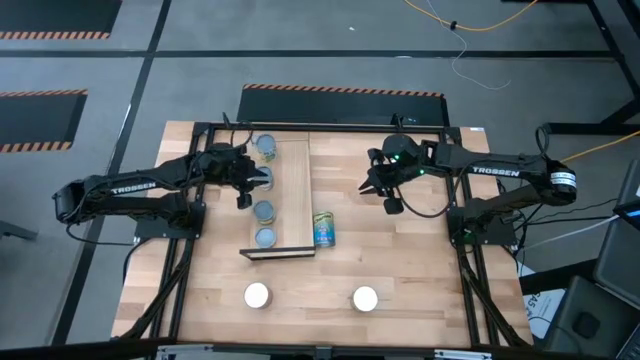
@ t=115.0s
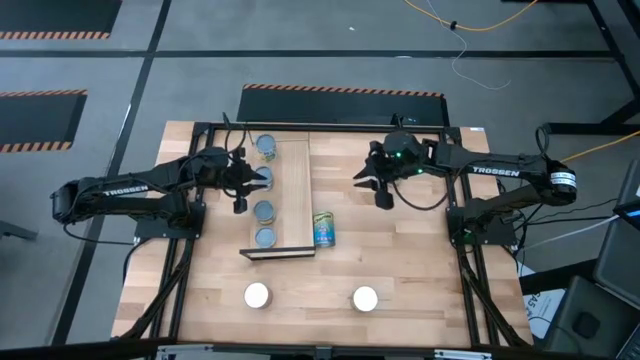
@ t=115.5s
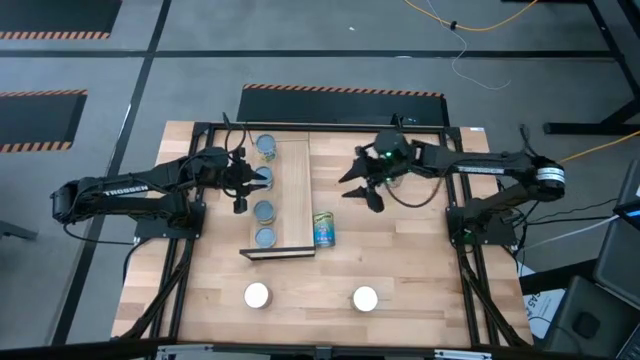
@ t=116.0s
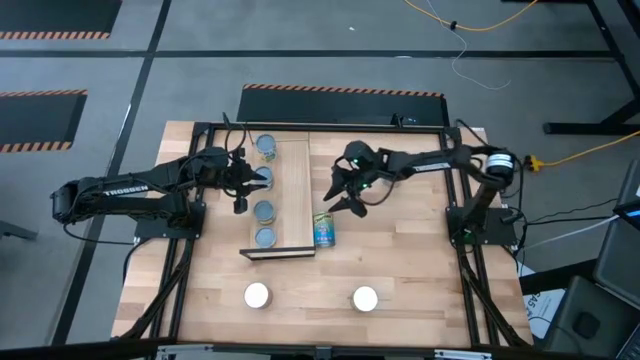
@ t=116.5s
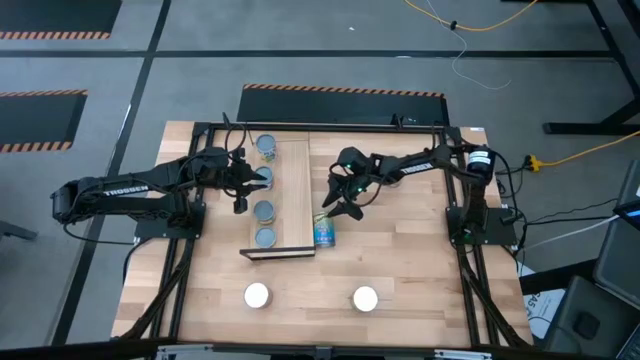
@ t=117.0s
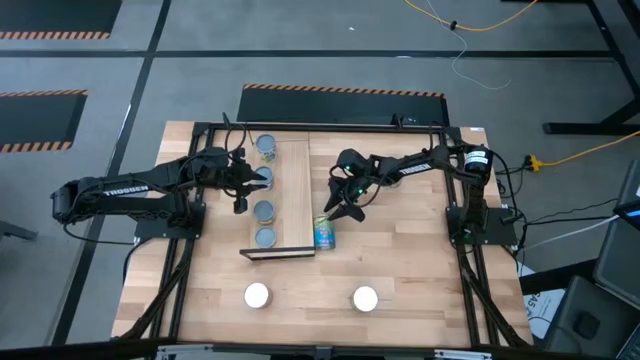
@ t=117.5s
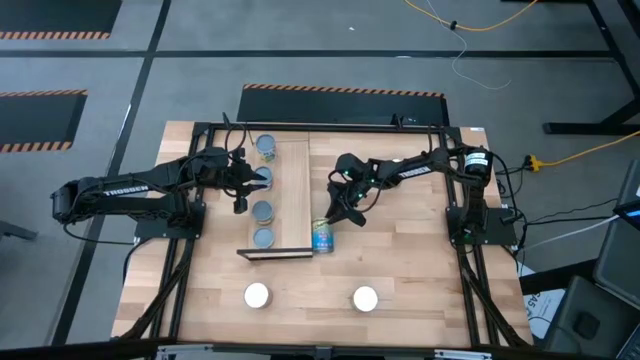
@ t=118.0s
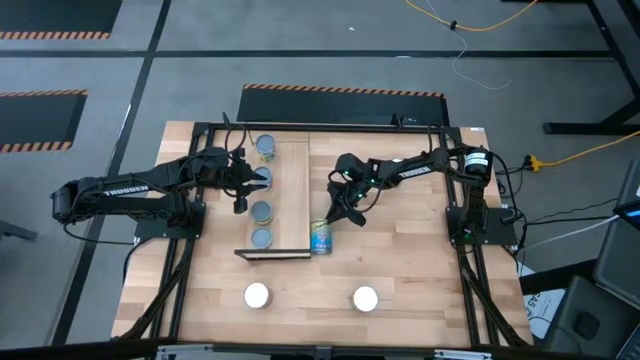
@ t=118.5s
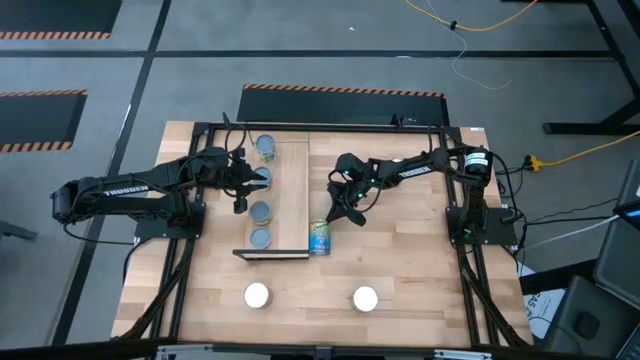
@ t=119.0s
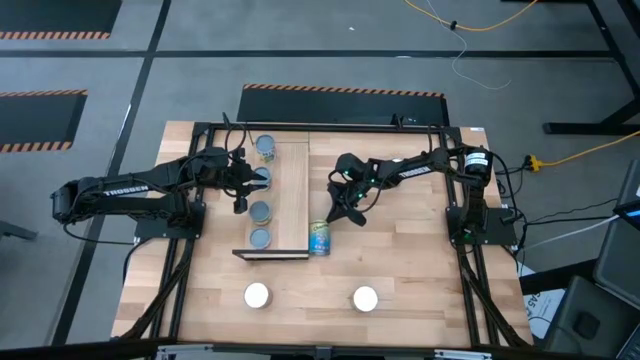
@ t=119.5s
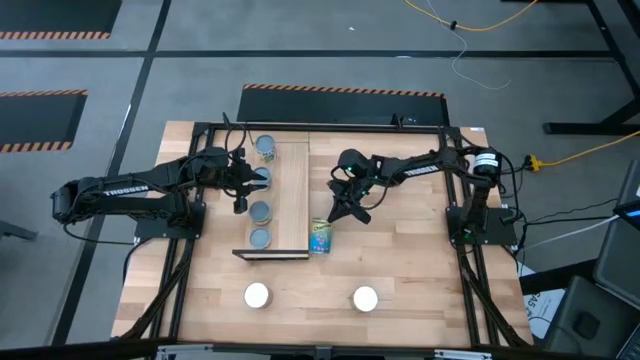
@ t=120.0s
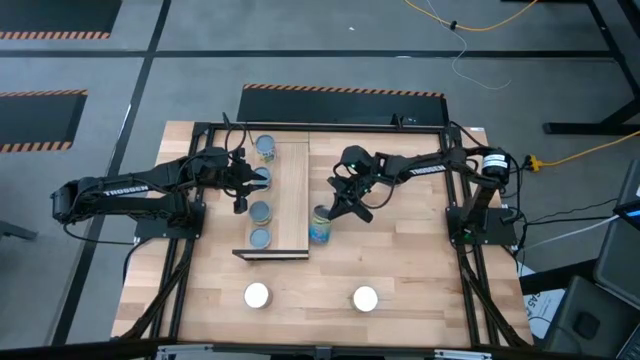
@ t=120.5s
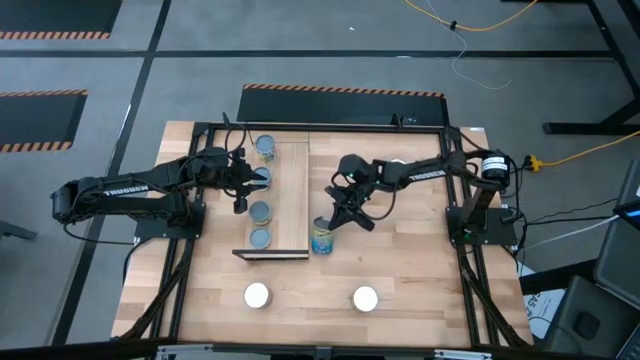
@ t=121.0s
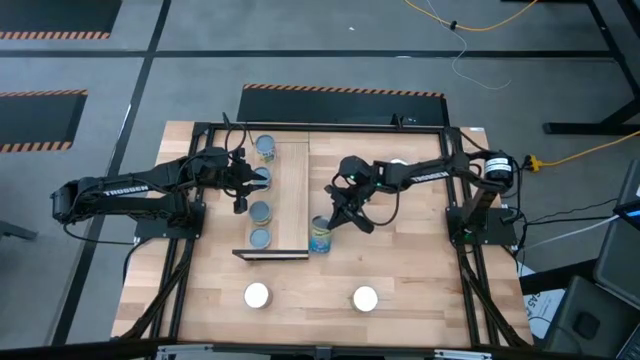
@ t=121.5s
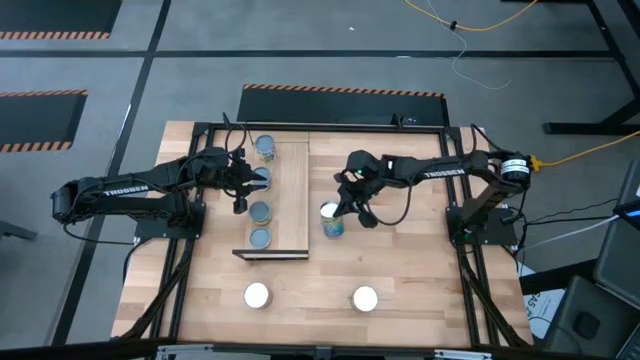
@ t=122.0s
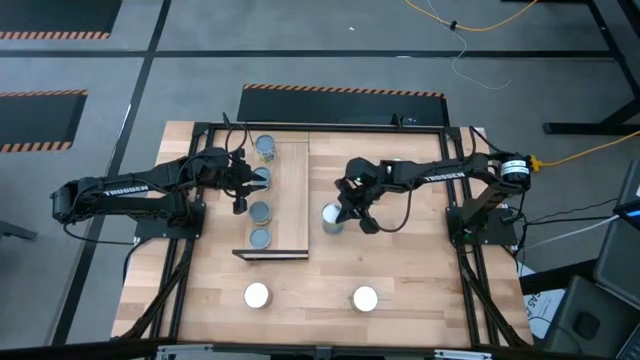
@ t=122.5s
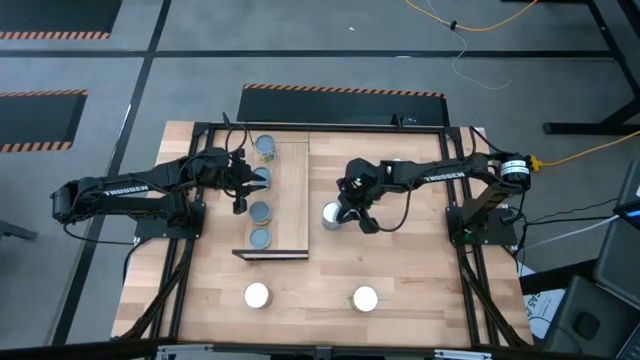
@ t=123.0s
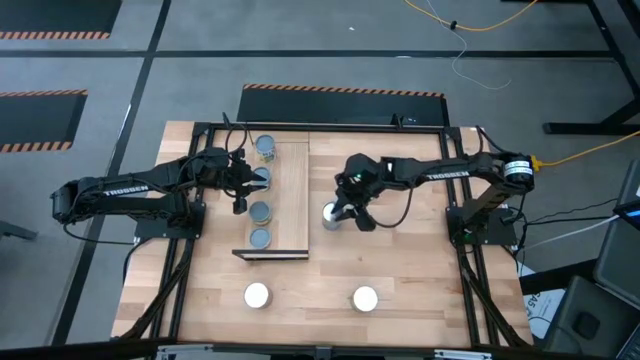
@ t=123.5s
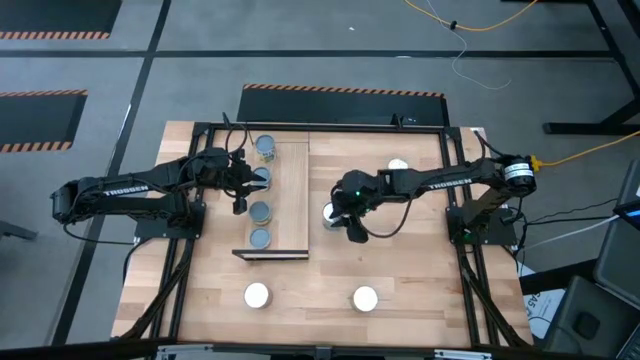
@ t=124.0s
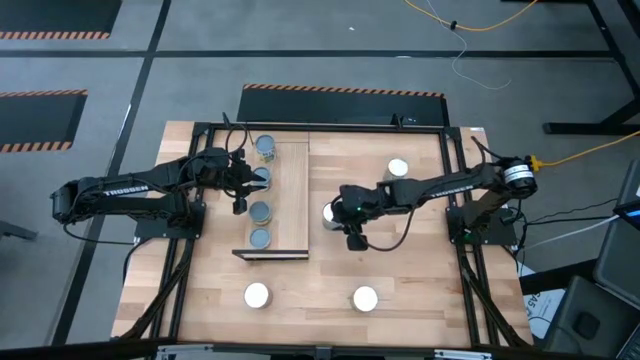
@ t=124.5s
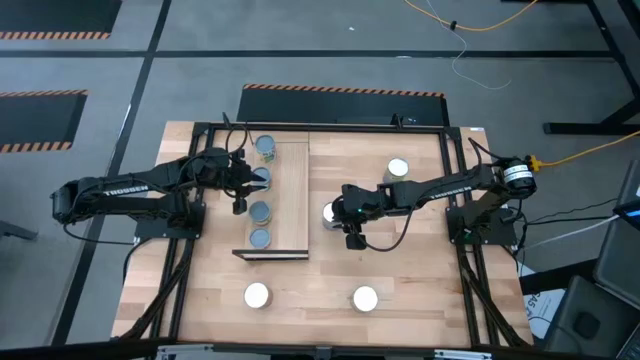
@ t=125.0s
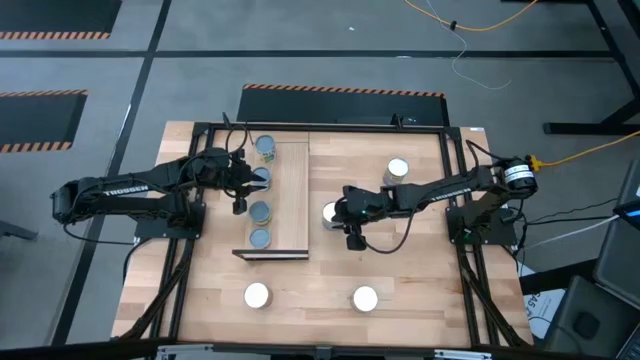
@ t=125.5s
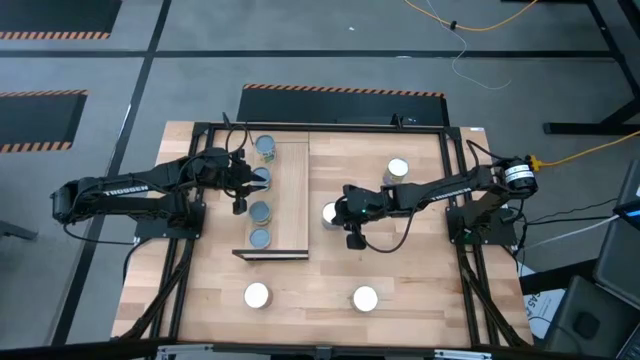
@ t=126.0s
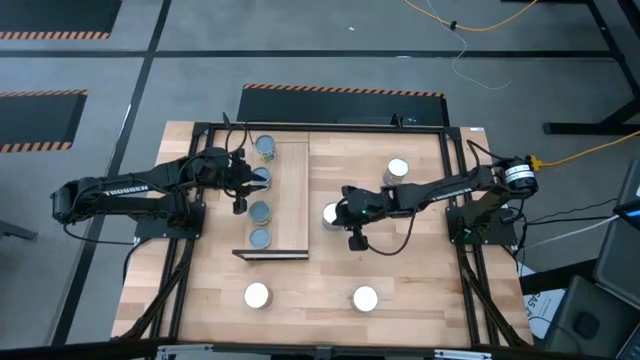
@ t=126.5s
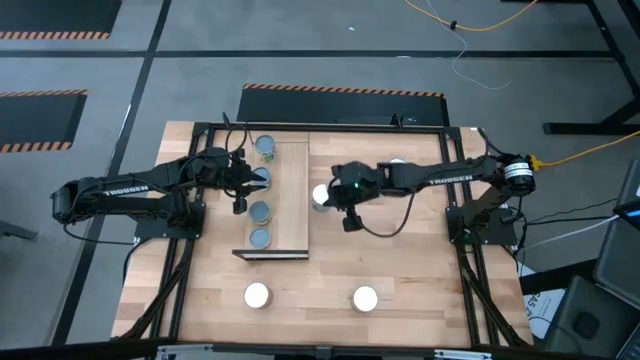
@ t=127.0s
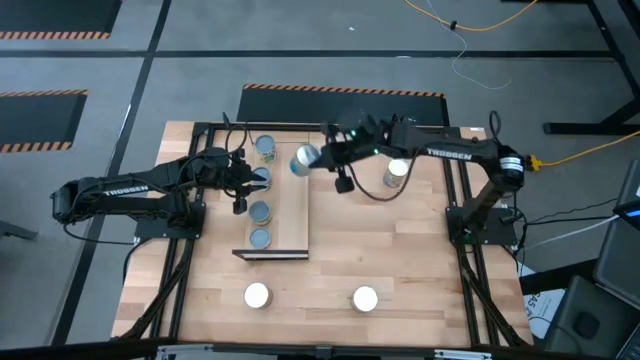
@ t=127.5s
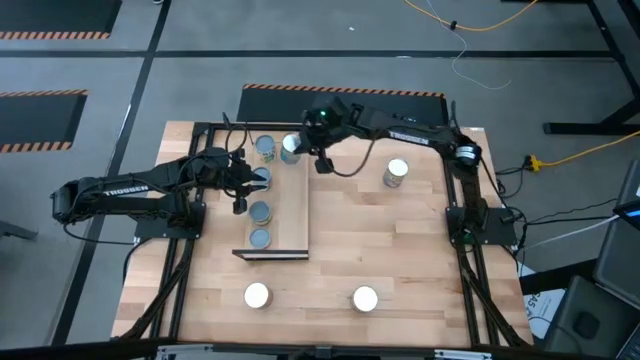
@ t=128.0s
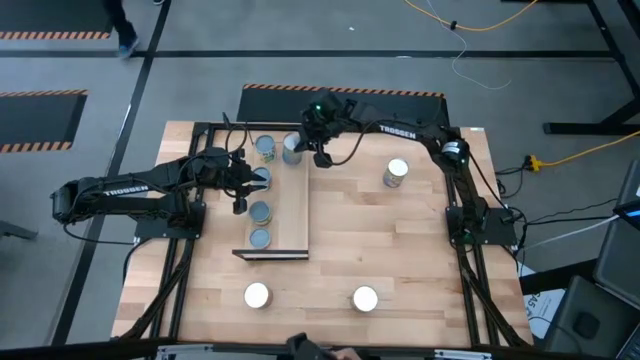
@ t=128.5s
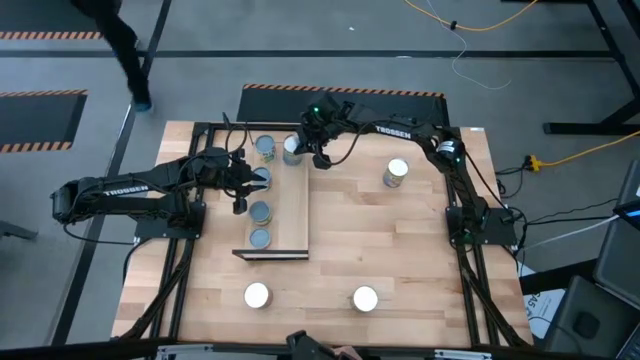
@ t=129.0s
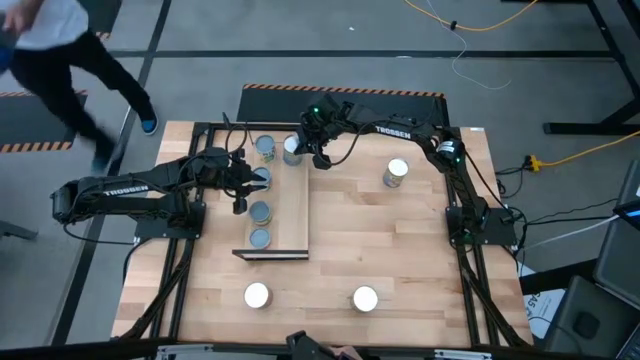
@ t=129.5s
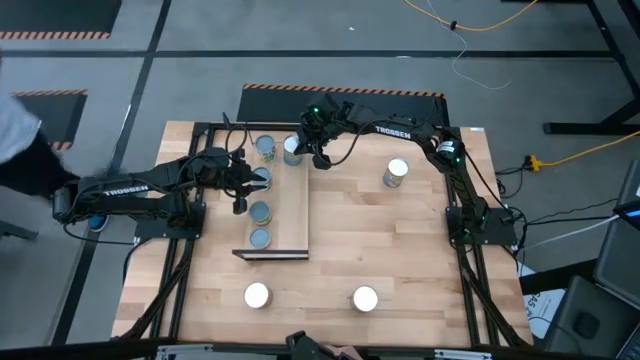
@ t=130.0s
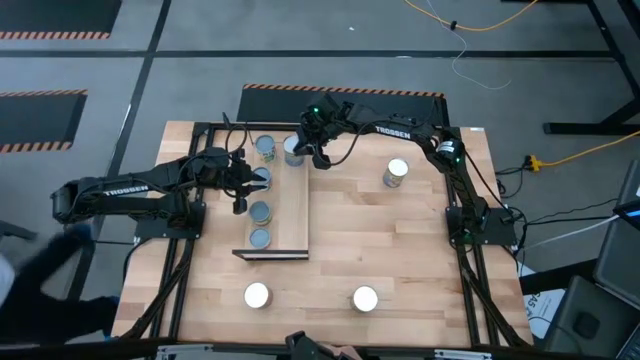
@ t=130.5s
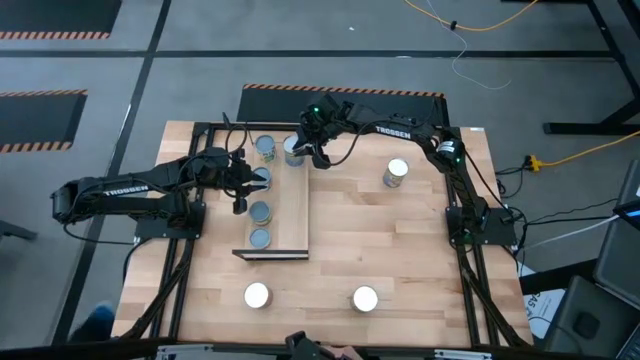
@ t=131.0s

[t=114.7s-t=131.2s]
Task: Pick and place cans onto a shelf
Put the canned cherries on the shelf

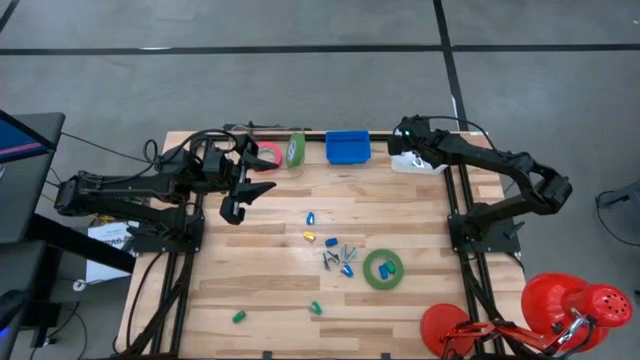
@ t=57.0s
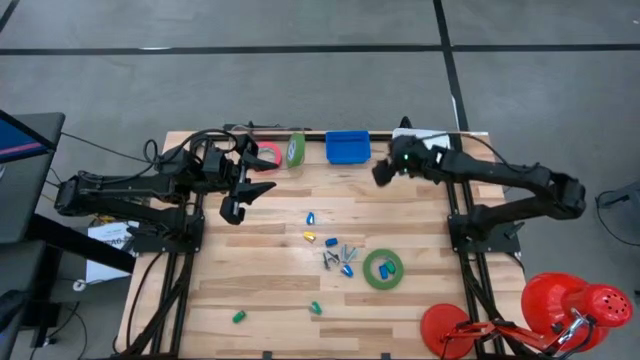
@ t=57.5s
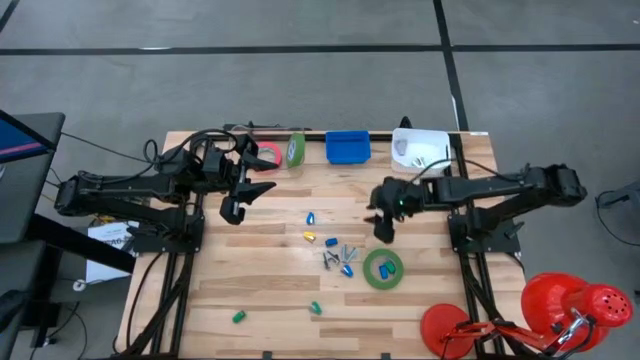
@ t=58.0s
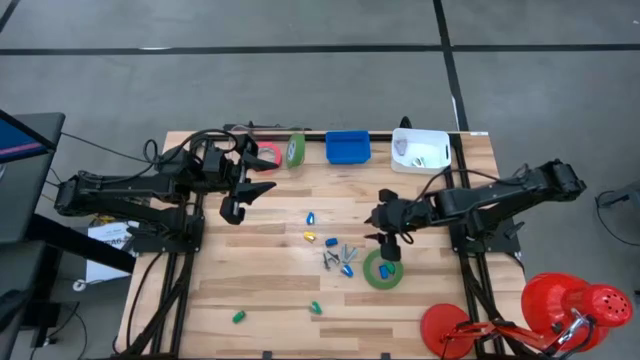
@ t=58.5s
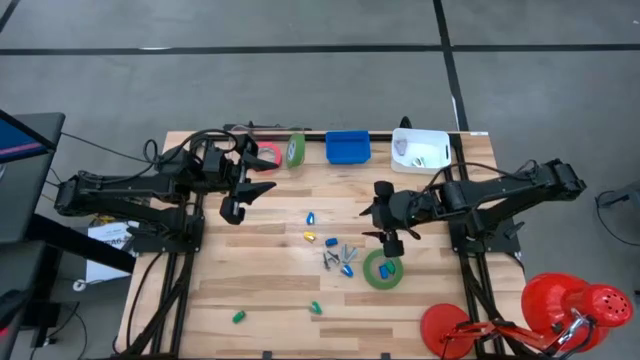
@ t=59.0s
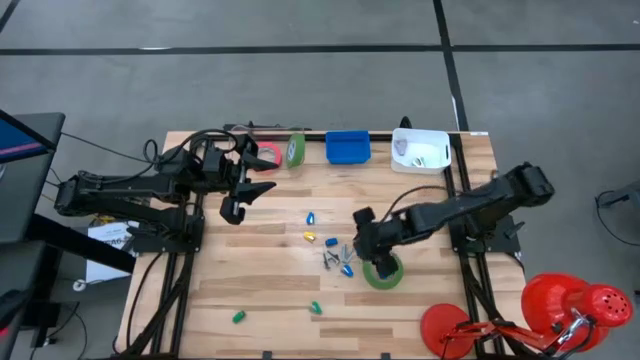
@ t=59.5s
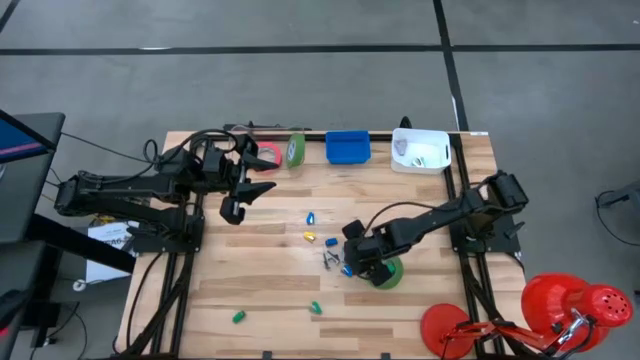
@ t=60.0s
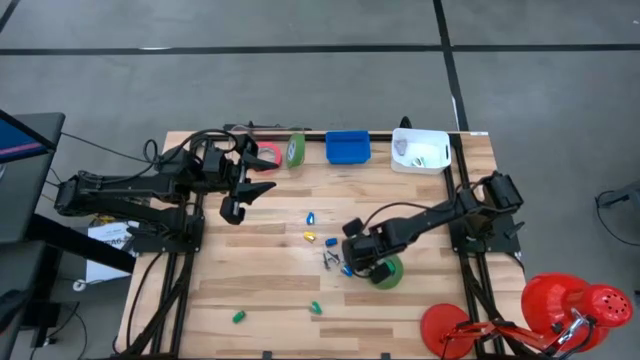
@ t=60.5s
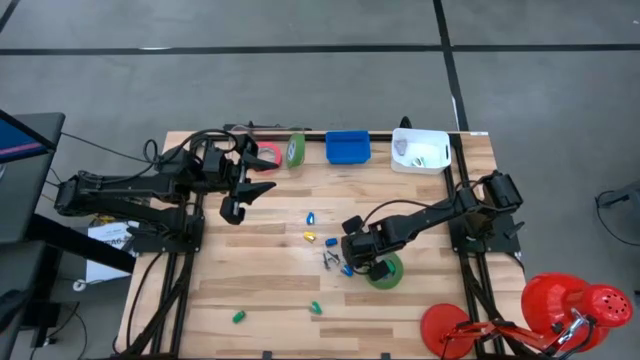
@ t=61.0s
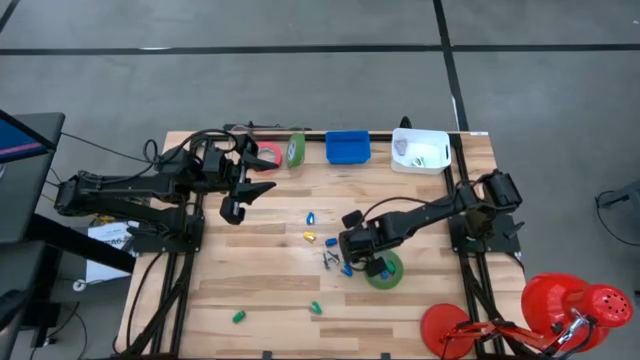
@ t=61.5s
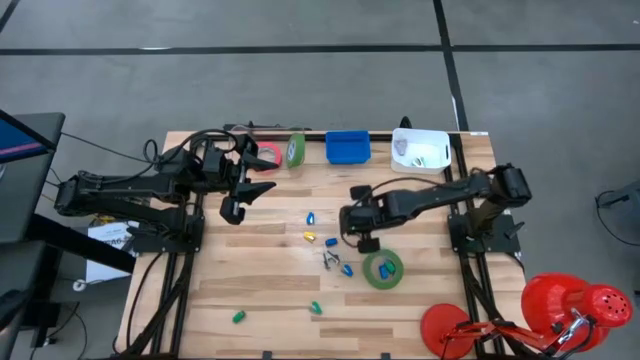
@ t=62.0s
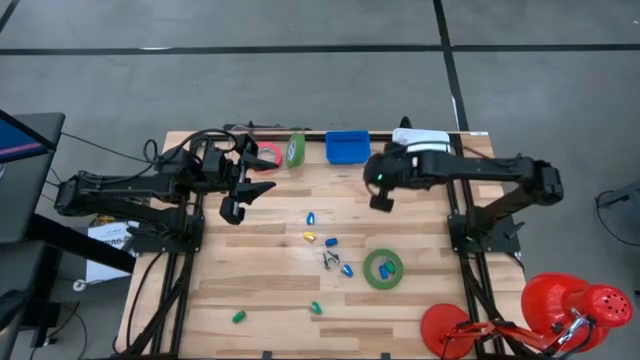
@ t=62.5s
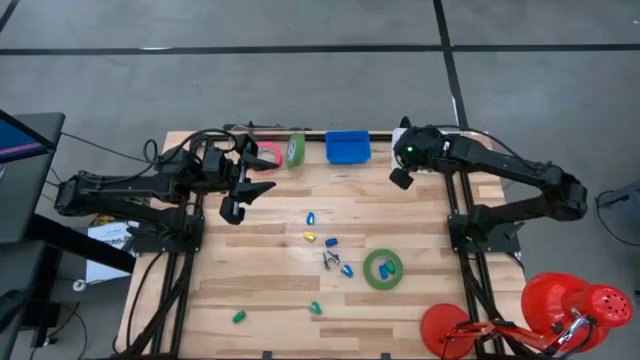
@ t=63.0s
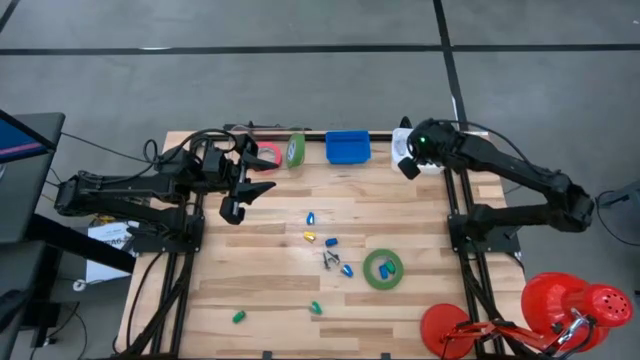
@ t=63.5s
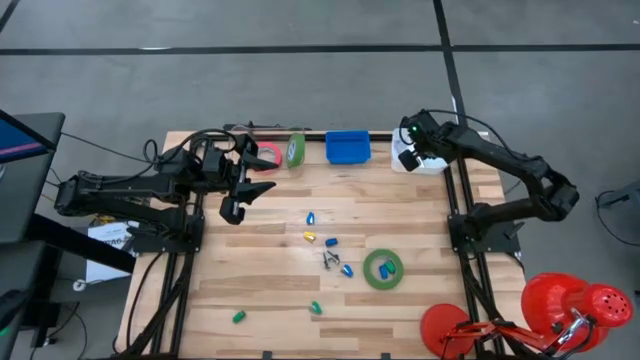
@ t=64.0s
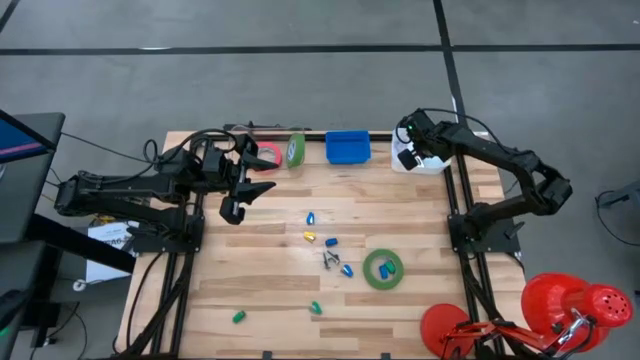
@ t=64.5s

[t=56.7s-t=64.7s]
Task: Pick and place Stapler, Stapler remover, tape
Put the gray staple remover into the white bin
